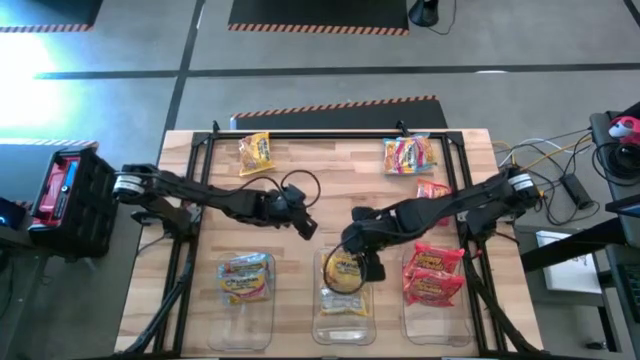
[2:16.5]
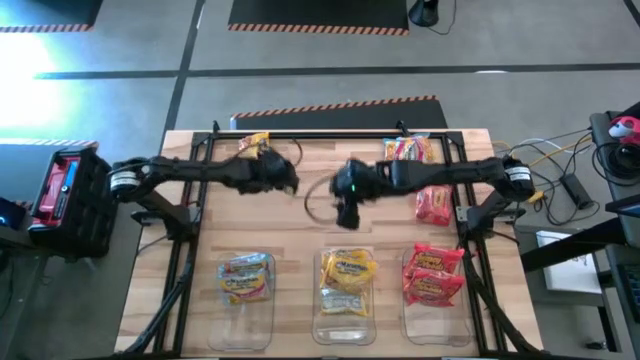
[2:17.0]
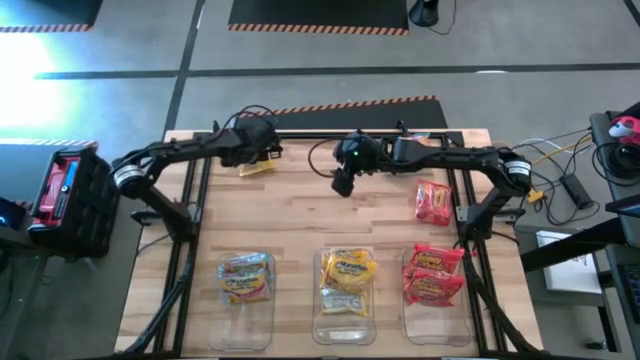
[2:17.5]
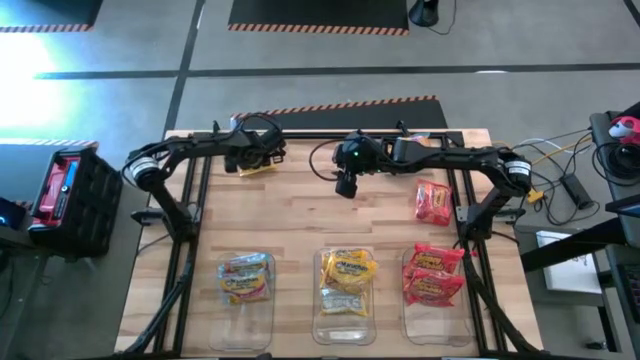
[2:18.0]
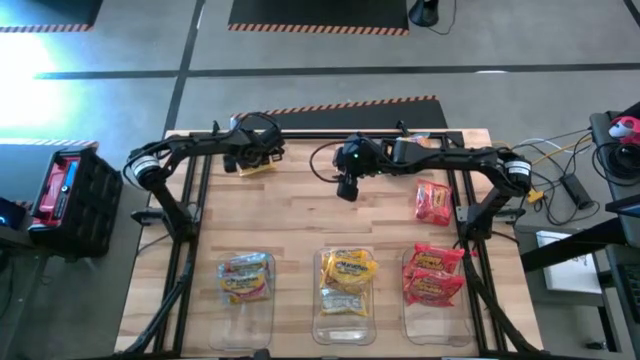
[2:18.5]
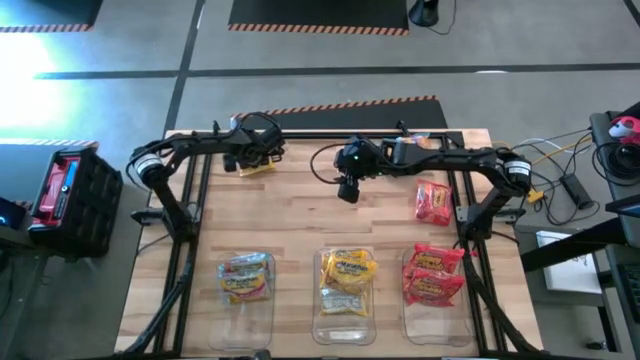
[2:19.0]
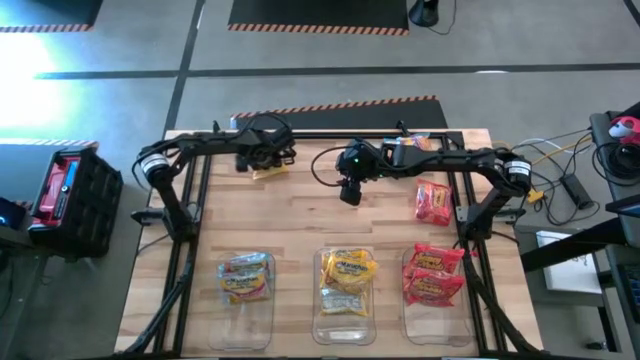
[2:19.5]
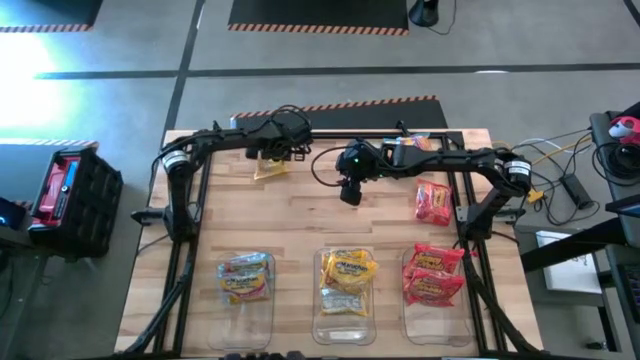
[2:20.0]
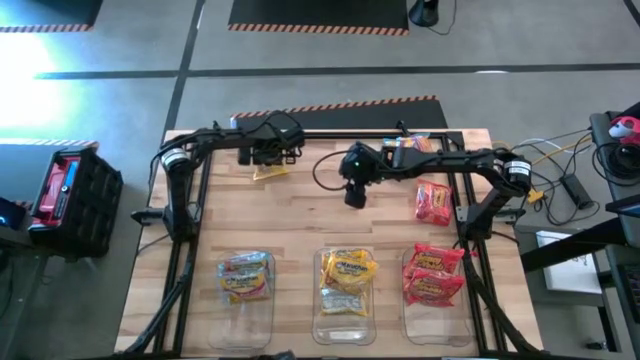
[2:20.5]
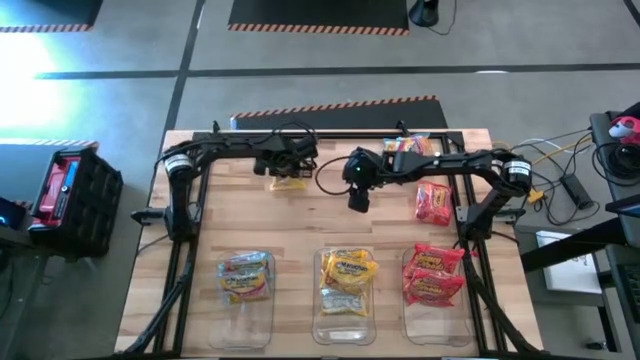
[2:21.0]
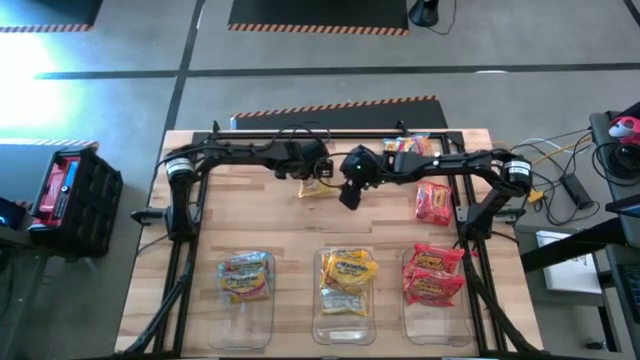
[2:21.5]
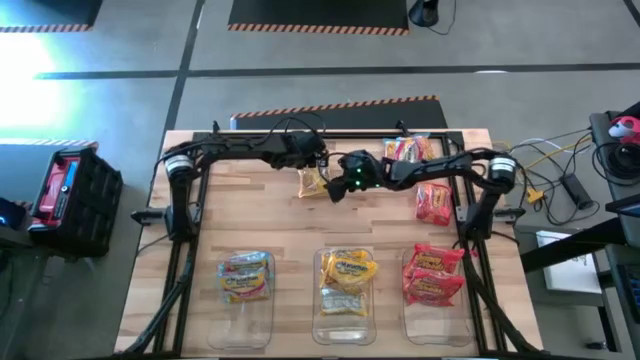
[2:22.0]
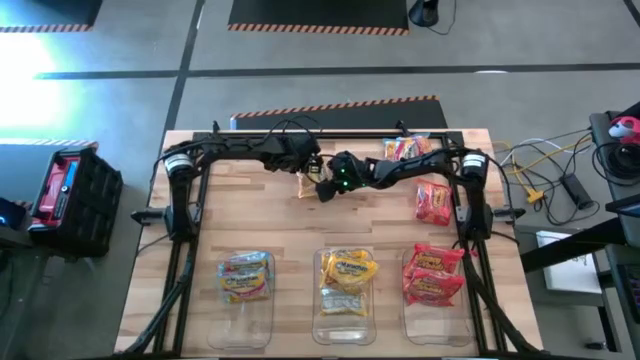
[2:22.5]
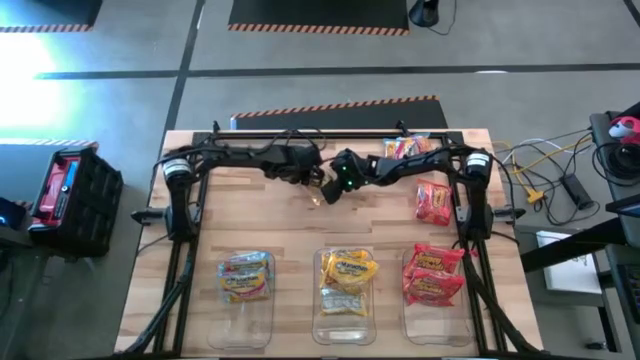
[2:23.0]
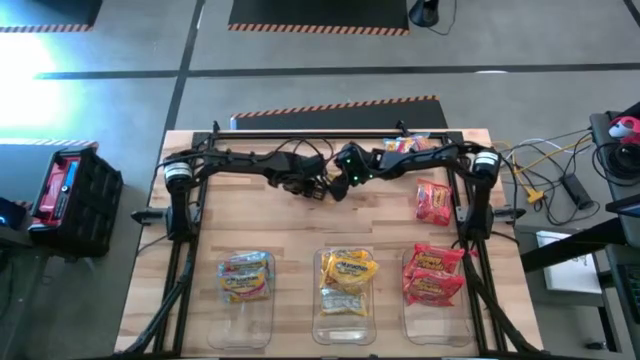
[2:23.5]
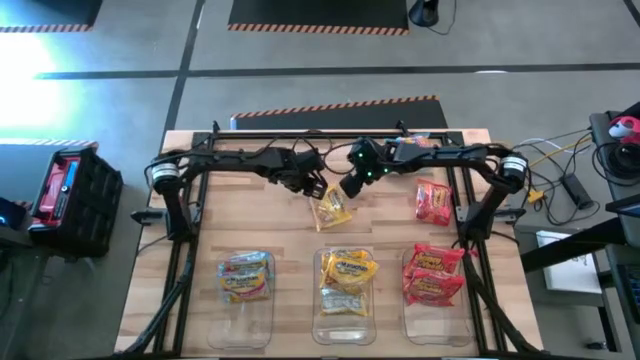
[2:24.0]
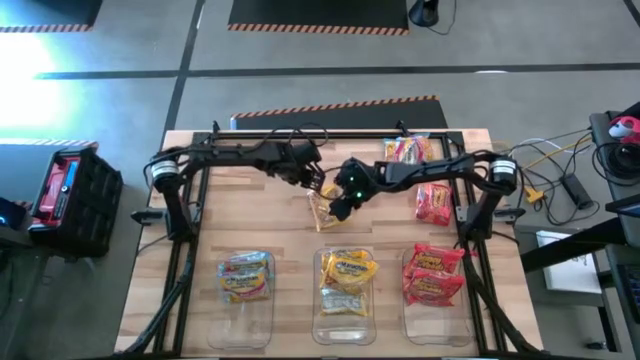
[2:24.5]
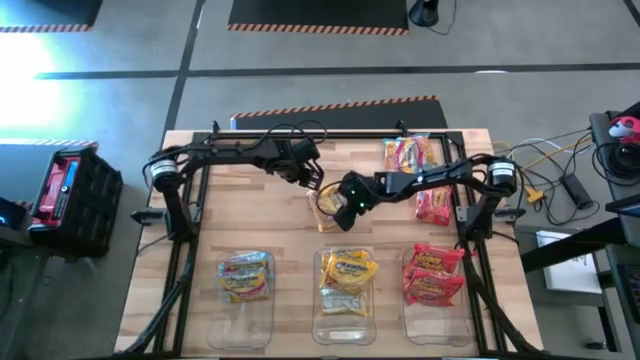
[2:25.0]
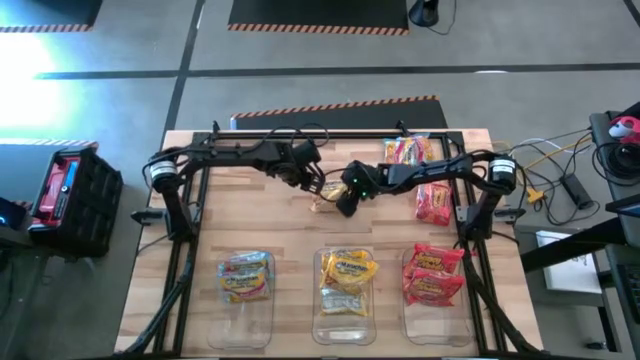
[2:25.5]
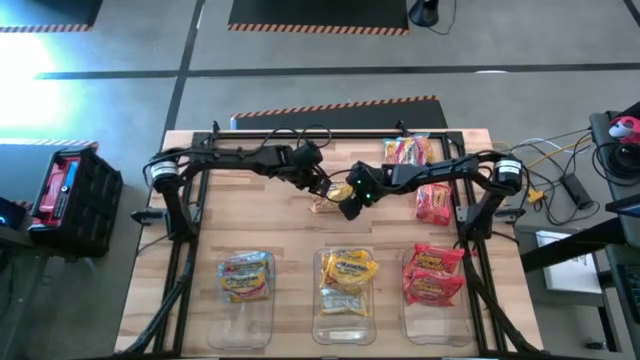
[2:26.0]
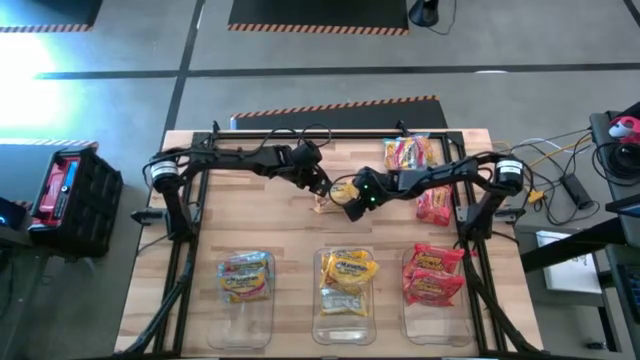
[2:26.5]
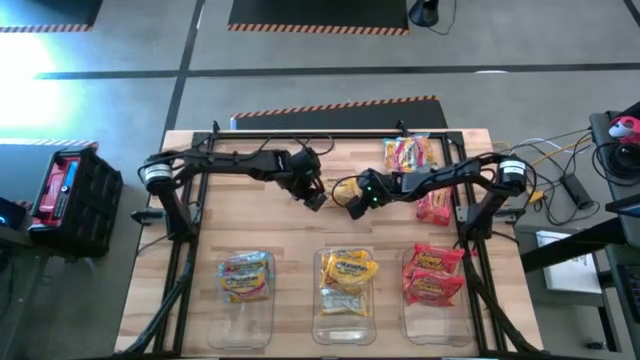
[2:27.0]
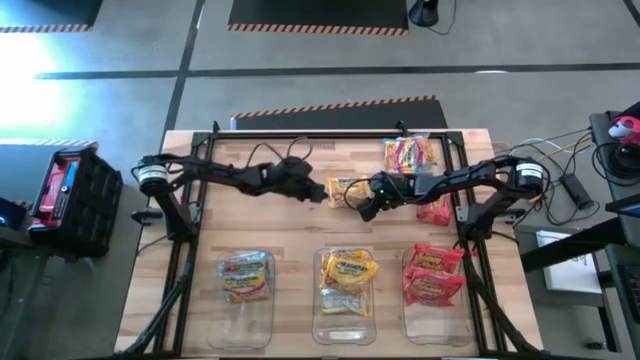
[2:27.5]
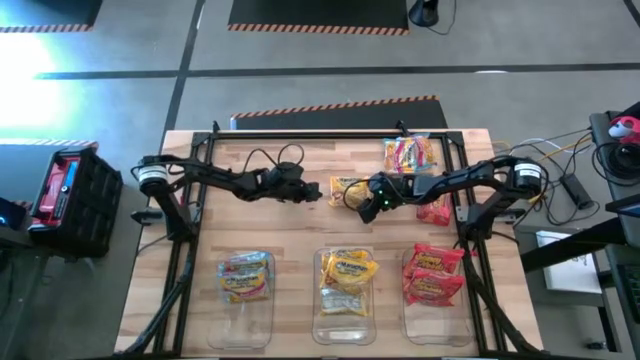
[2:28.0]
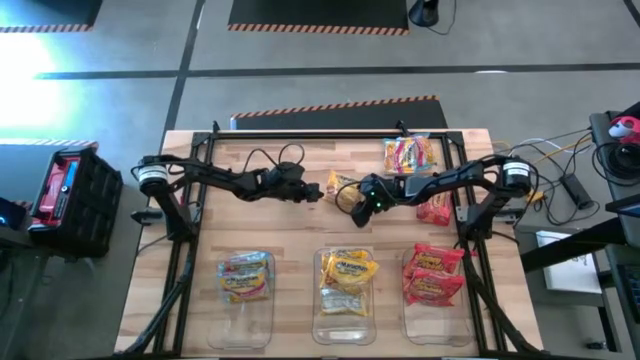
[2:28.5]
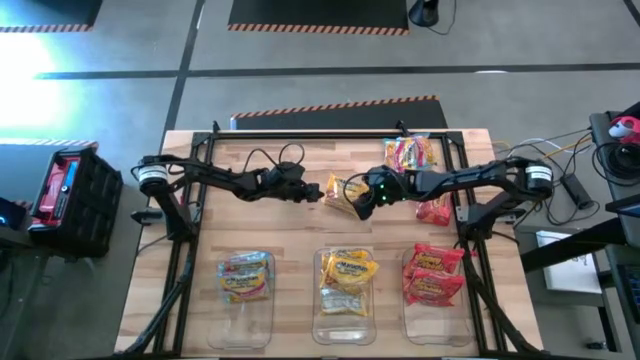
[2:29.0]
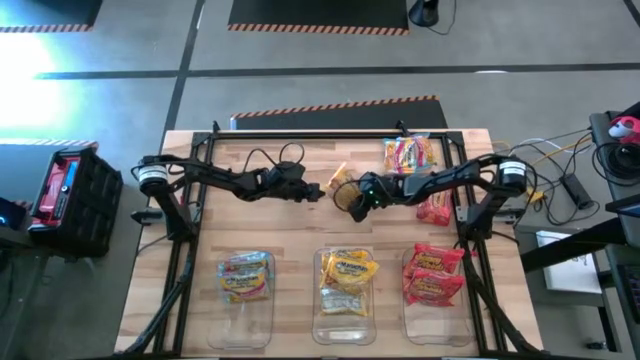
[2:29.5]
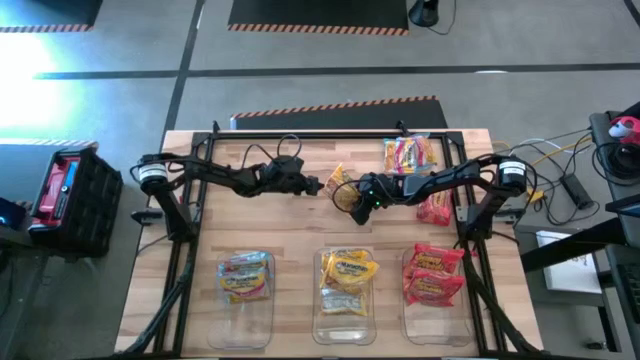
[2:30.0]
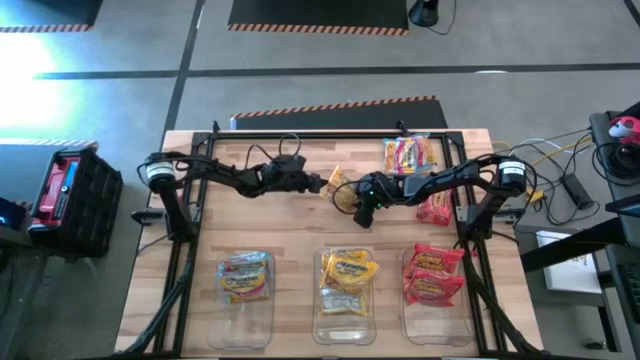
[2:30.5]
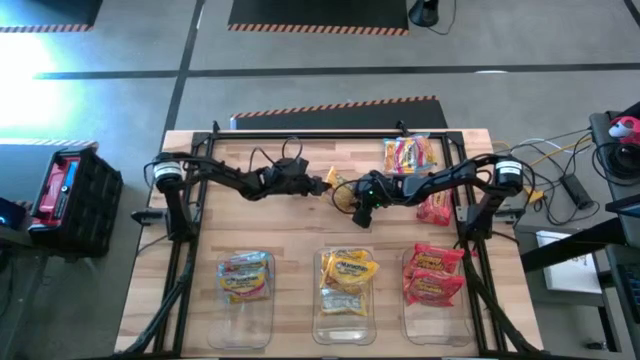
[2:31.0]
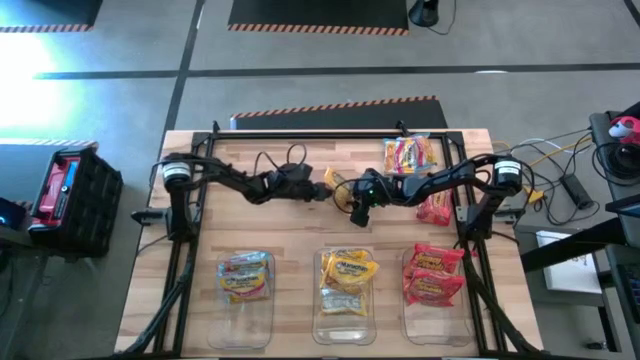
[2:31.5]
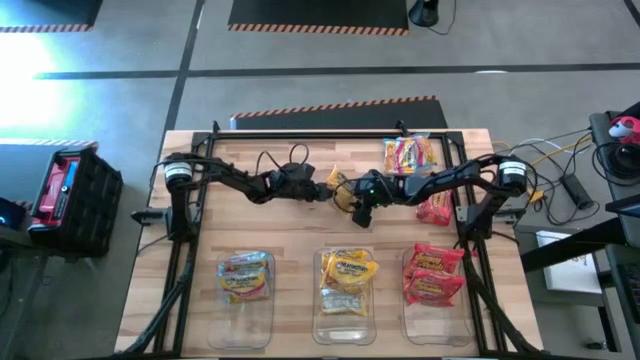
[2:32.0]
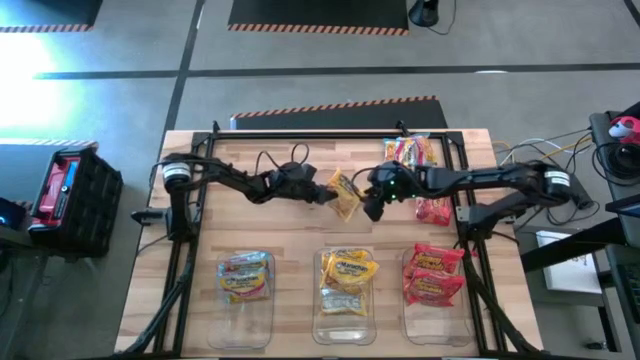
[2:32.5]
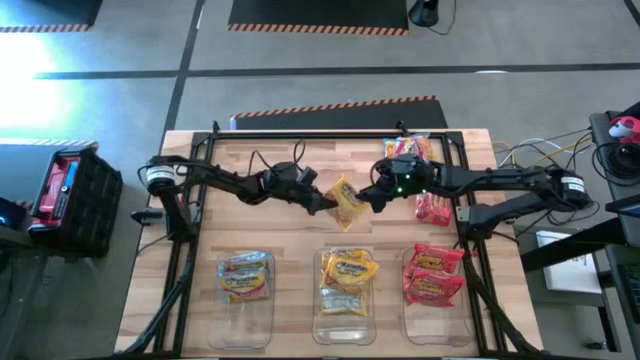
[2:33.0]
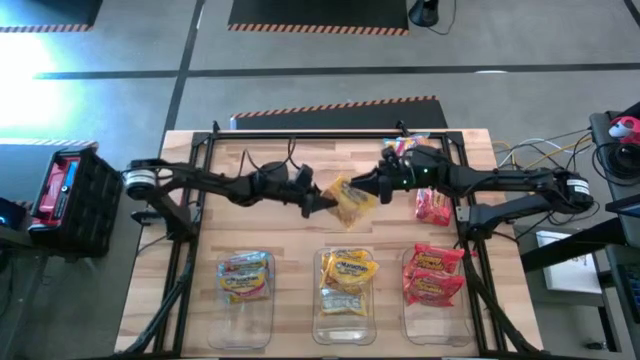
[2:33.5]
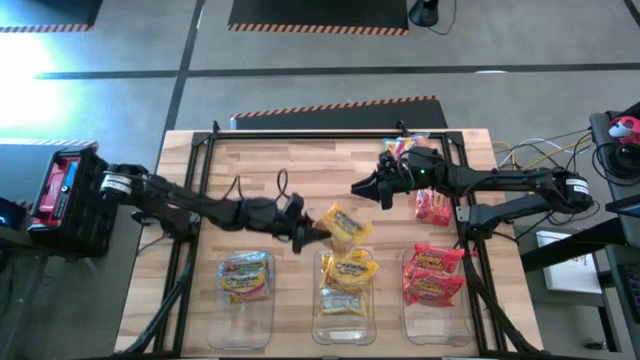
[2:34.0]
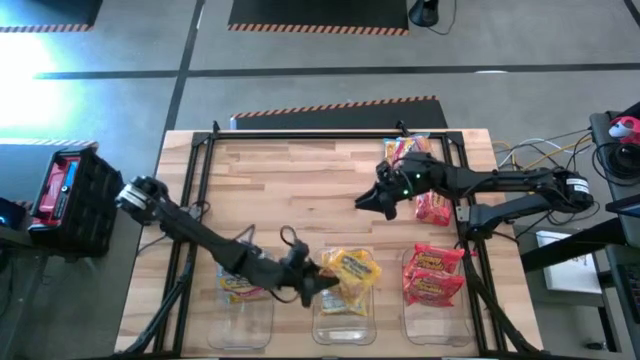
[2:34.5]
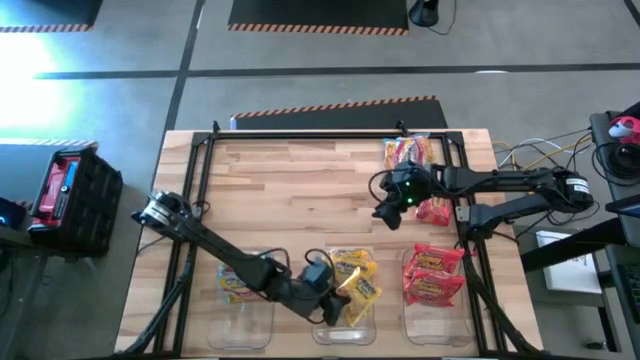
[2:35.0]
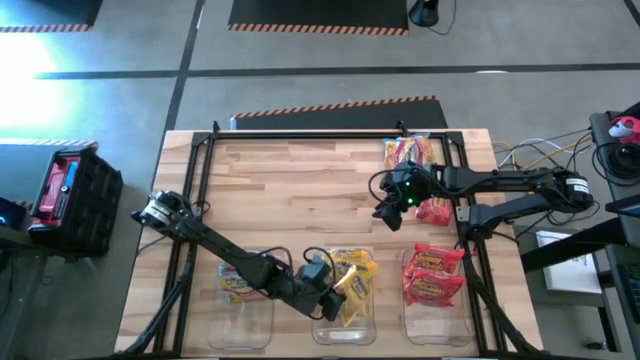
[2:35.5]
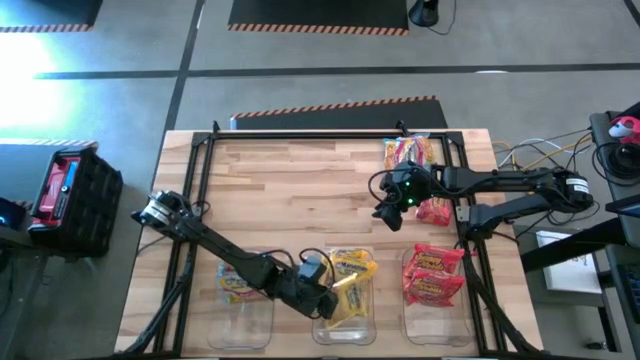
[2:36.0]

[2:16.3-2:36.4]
Task: Sort Maruchan noodles
Put the yellow noodle pack into the middle transparent bin
